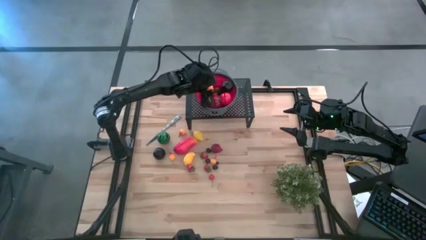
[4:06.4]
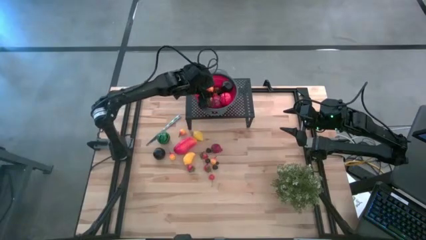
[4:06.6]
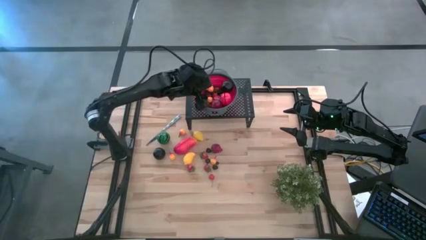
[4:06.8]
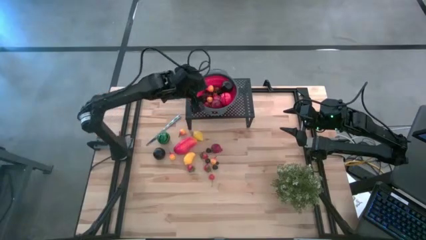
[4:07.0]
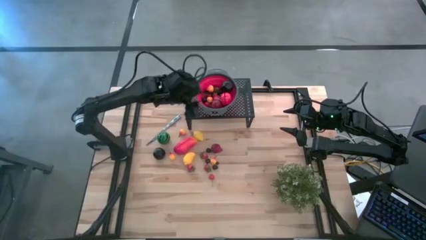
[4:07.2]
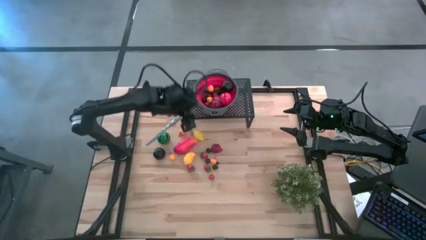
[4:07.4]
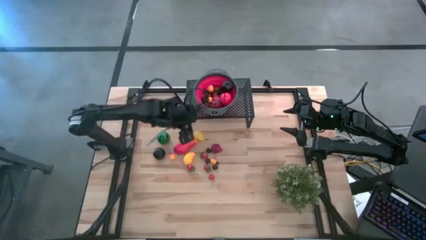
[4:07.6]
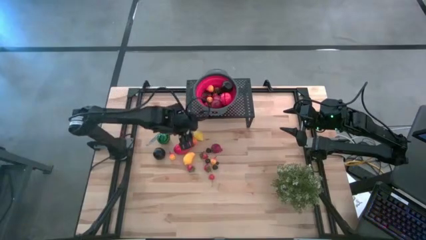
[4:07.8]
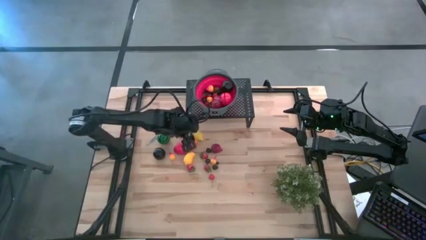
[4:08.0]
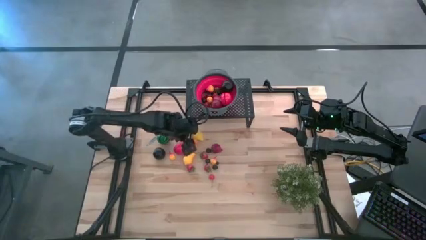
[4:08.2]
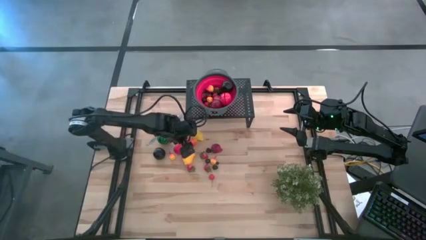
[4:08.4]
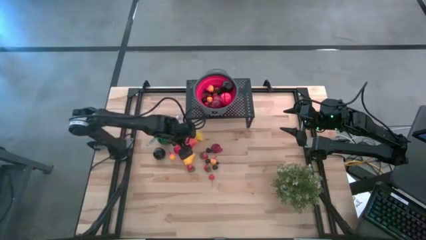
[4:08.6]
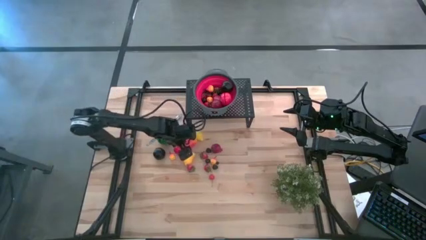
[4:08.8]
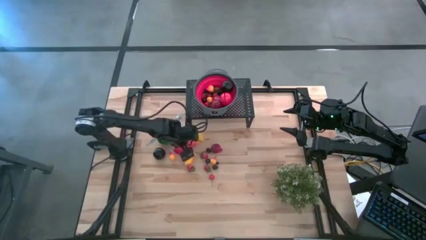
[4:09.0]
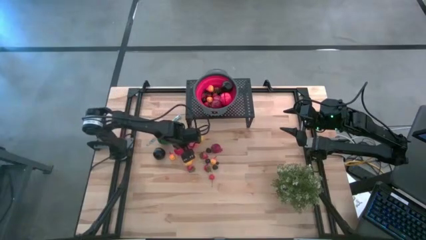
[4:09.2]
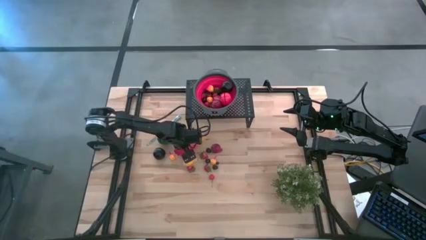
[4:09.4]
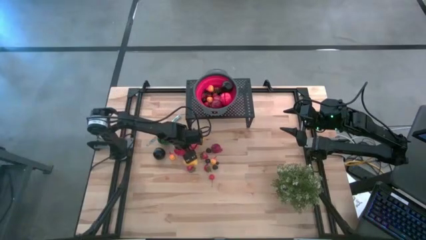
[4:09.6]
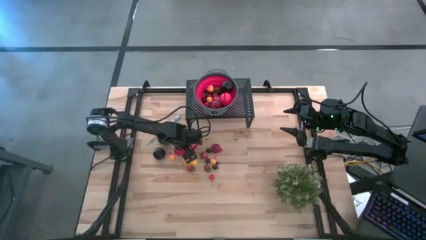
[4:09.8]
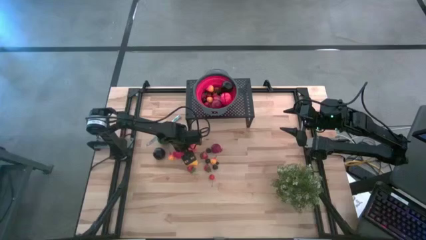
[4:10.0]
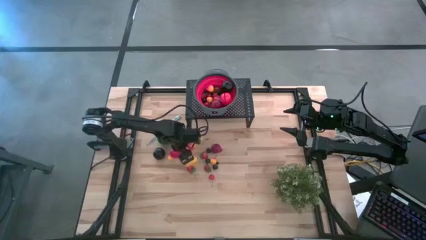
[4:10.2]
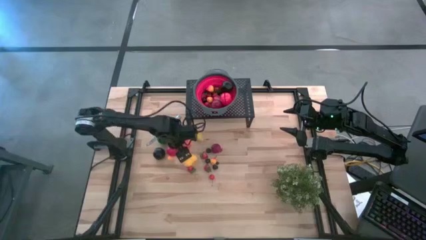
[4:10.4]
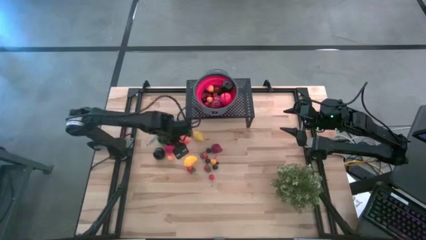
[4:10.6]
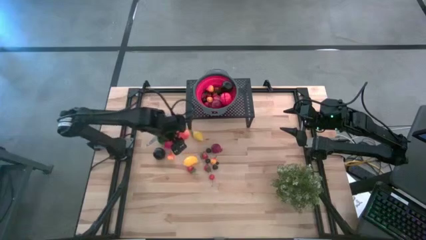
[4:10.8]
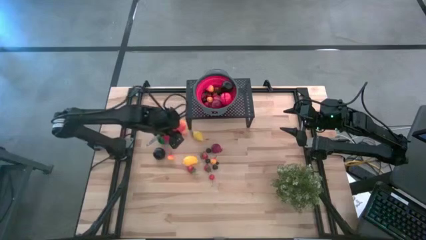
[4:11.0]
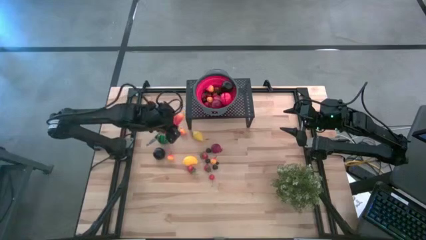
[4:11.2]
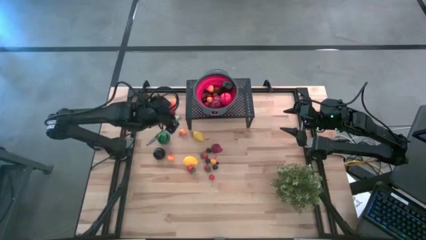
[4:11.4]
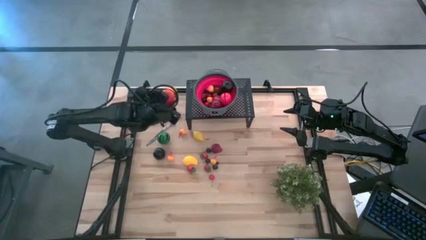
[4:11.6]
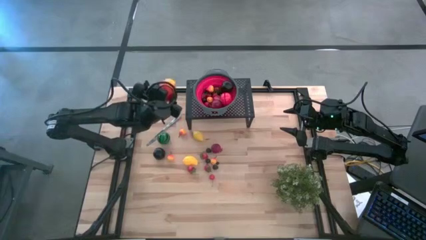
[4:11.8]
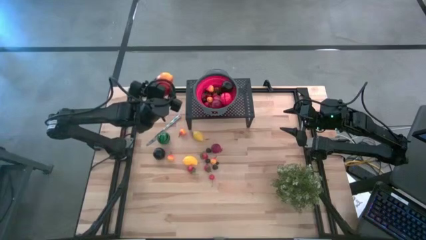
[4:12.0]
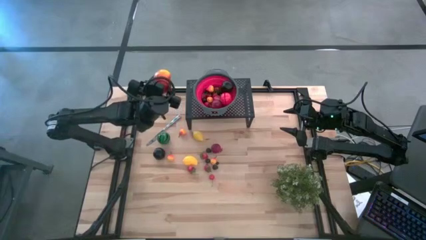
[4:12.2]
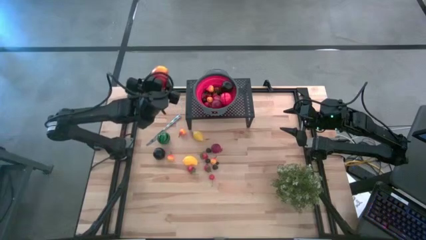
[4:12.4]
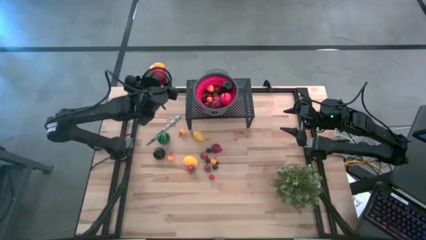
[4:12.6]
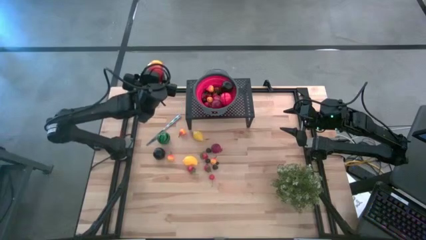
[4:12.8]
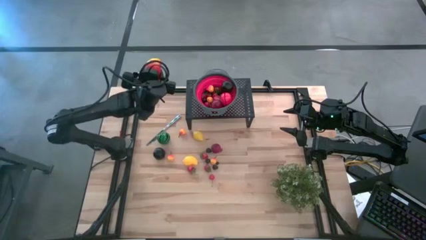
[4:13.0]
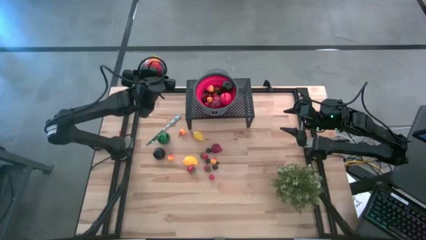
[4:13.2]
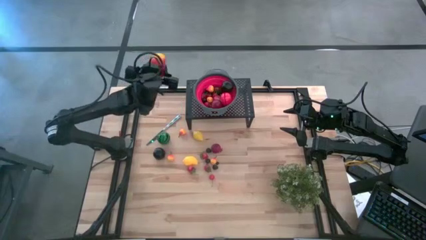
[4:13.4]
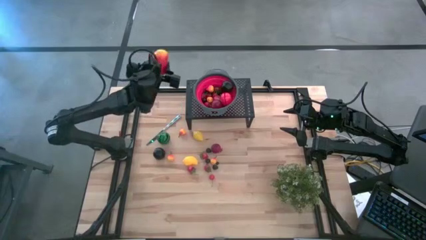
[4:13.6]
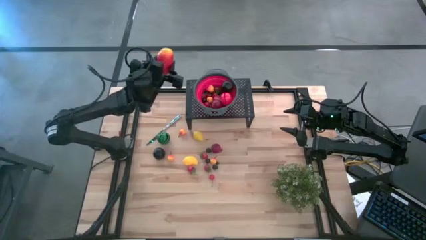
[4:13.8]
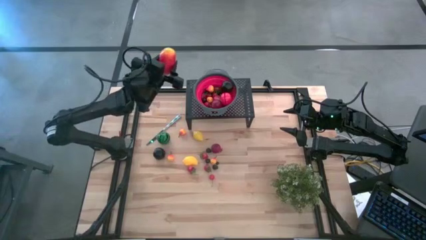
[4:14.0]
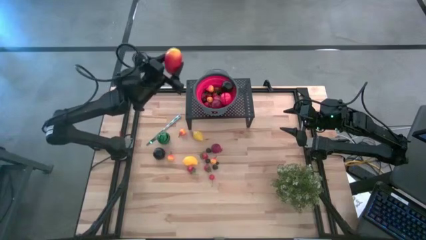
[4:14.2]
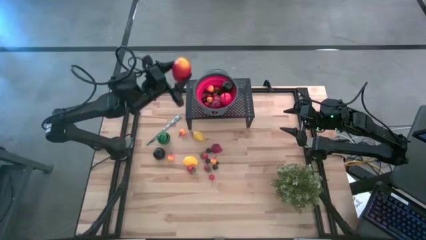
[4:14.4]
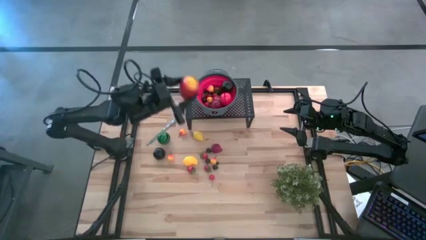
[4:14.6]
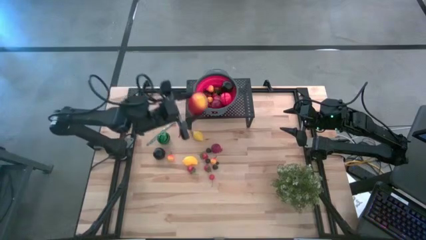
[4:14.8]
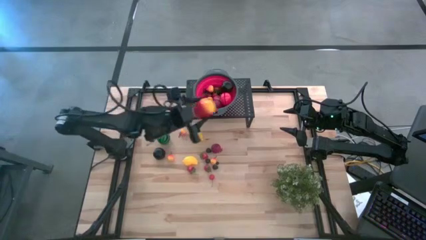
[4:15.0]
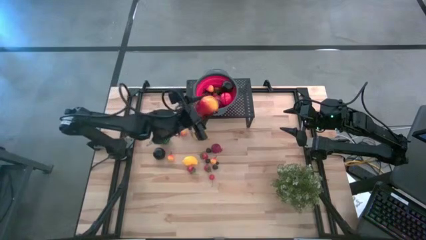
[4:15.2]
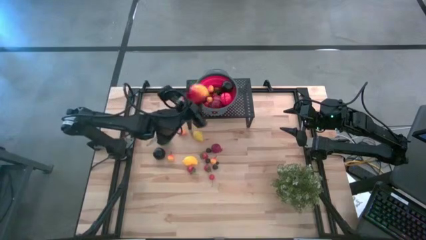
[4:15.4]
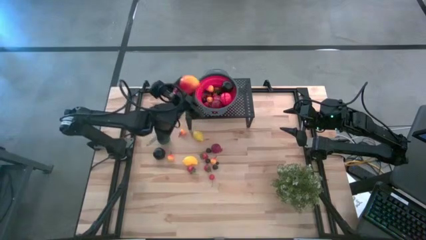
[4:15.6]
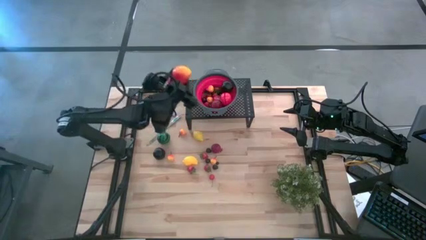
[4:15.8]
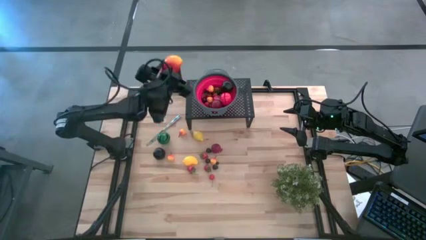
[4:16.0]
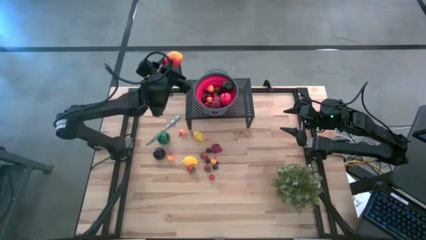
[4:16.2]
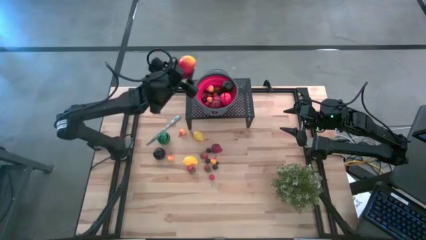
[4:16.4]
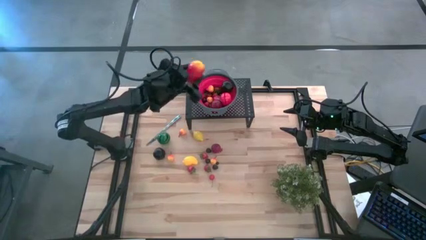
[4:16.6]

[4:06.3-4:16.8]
Task: Pick & Place Fruit
Put the mango in the red colander on the shelf

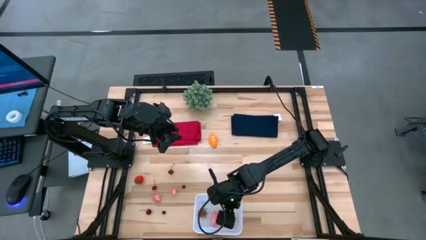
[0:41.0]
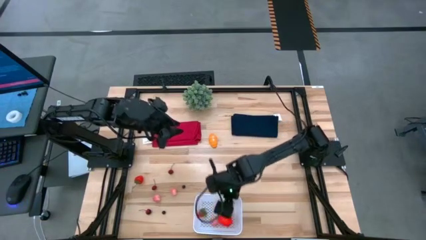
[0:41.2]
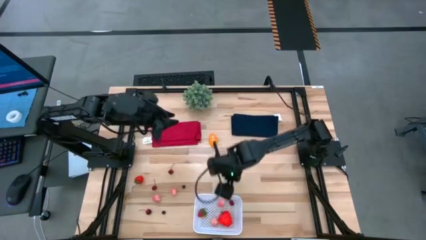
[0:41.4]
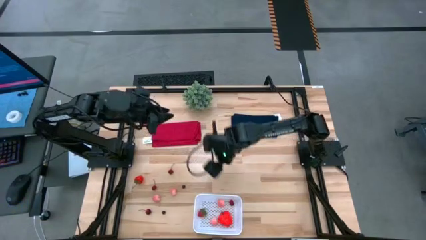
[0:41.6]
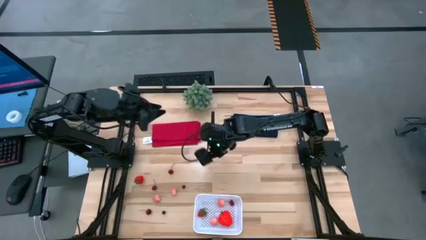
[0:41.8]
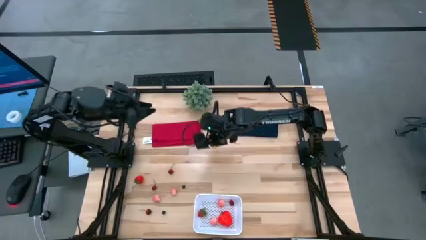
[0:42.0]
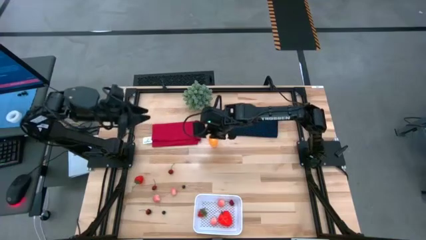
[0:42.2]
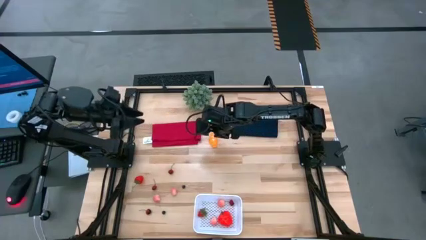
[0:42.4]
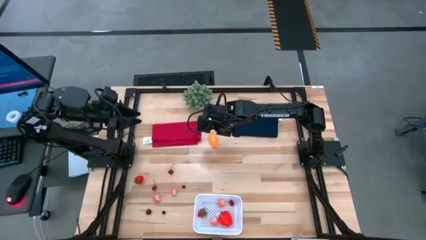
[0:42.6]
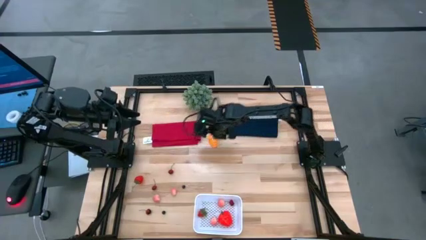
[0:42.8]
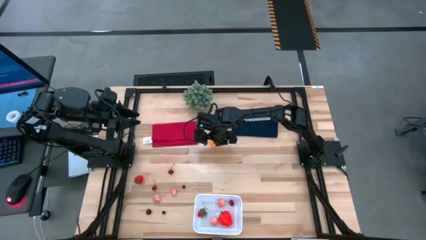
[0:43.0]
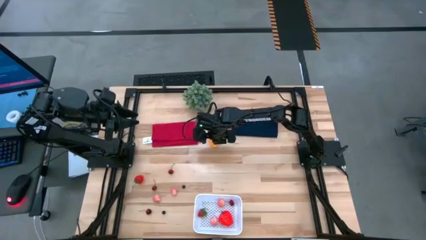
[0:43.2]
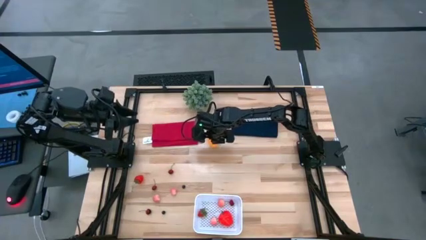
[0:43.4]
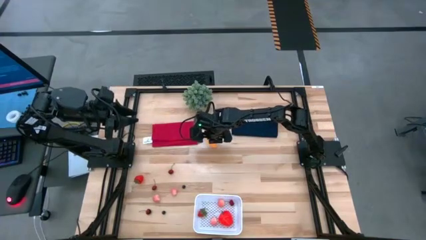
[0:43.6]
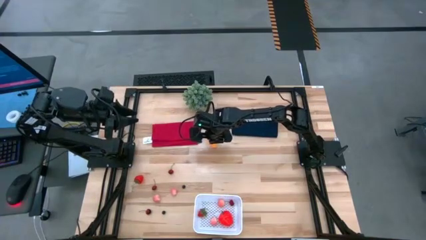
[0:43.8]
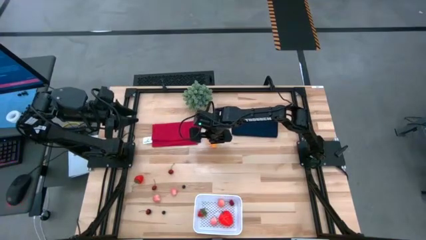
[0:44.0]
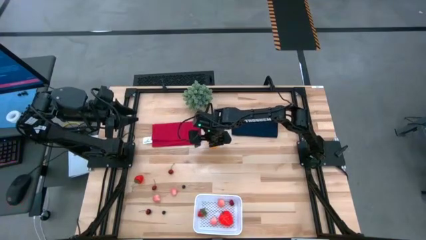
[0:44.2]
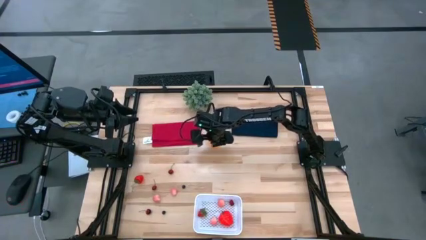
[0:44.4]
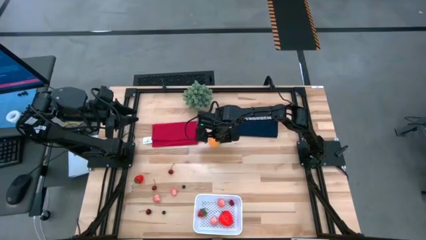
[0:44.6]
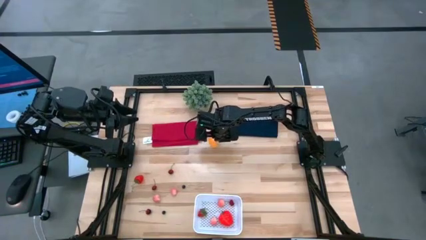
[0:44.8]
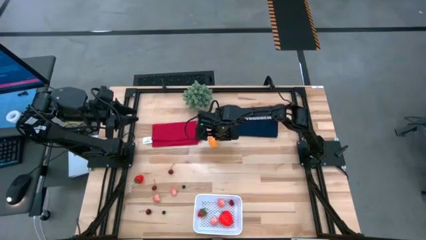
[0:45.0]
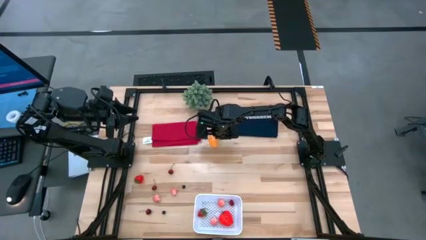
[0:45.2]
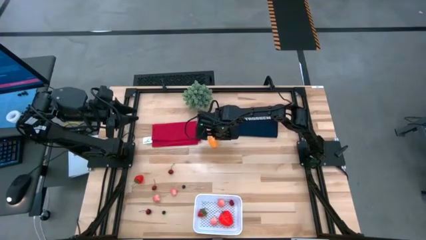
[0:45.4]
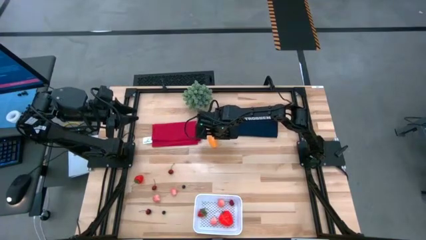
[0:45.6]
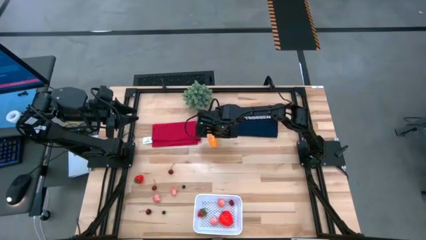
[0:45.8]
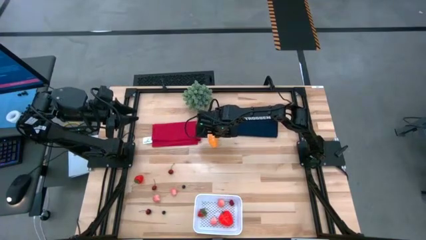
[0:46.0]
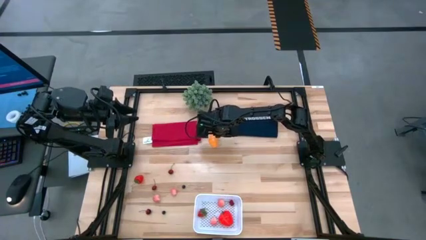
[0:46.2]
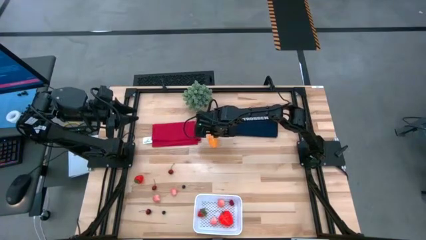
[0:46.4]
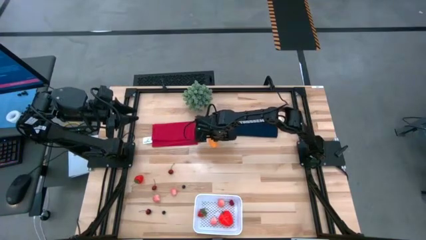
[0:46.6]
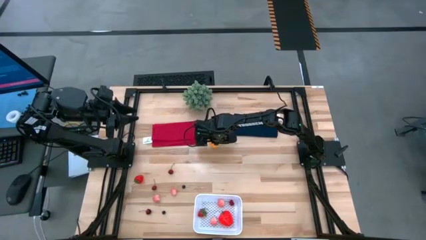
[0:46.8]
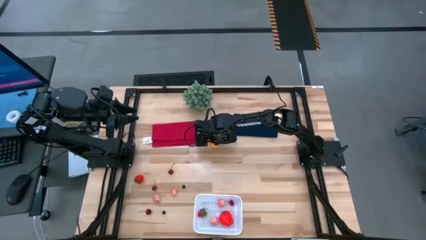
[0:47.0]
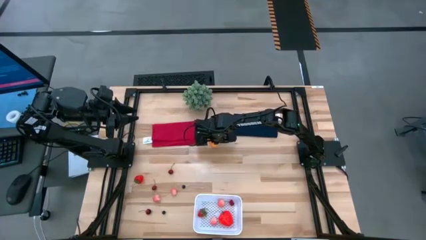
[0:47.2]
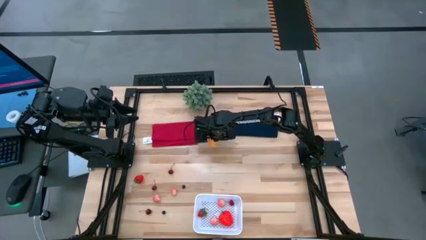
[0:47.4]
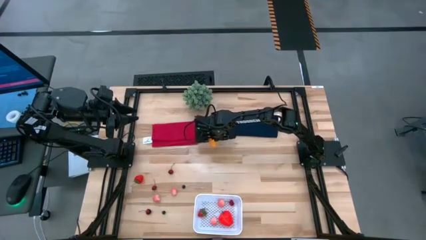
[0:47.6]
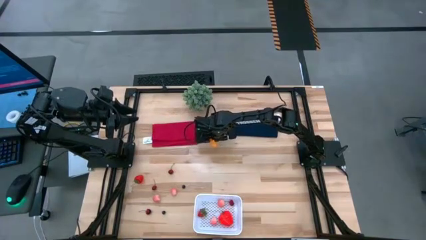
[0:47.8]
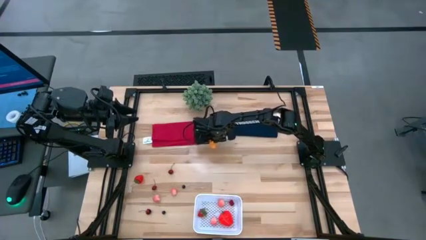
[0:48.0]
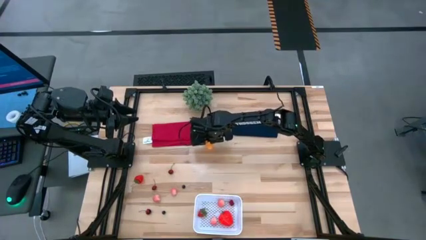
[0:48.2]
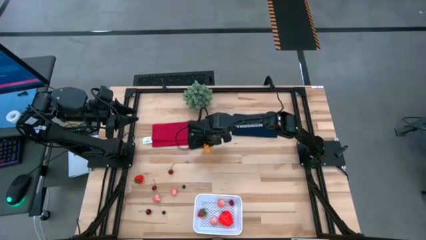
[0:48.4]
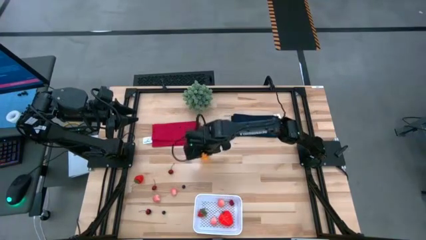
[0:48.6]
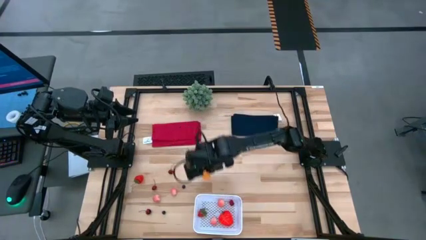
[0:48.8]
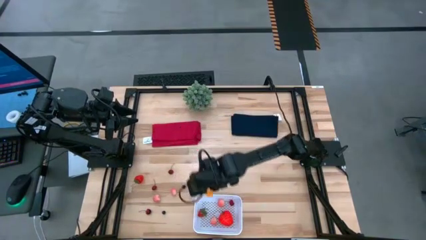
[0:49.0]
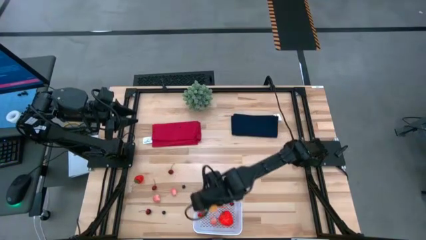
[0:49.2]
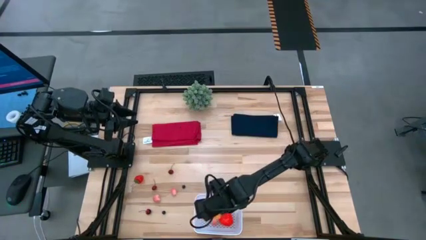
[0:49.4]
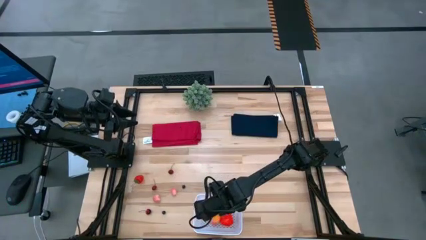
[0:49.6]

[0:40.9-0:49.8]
Task: Pick and placing Produce into tupperware
Put the croissant into the white bin
